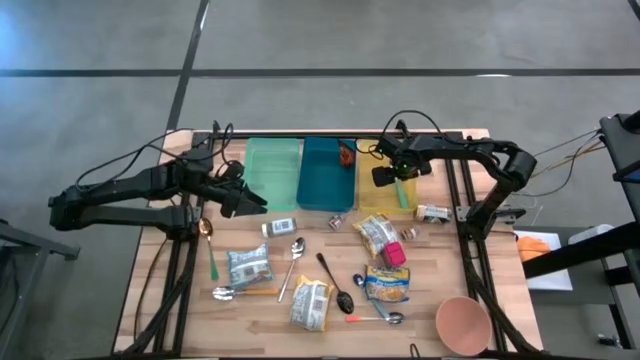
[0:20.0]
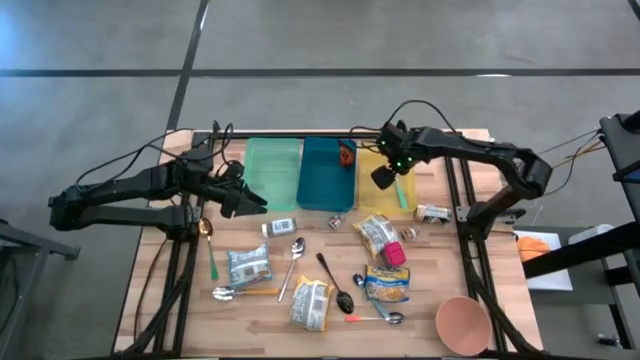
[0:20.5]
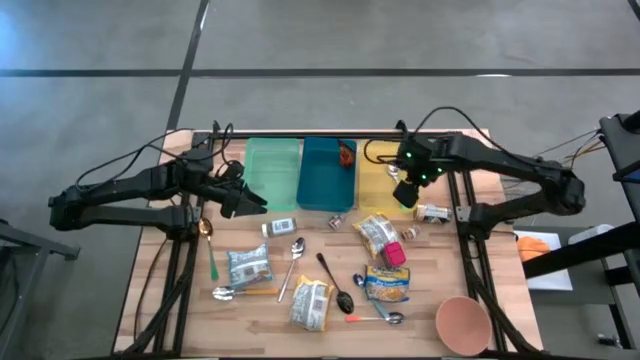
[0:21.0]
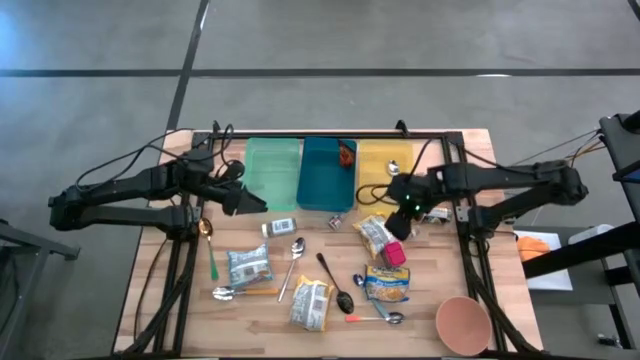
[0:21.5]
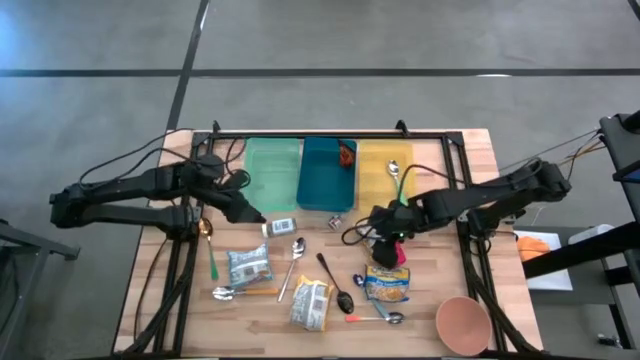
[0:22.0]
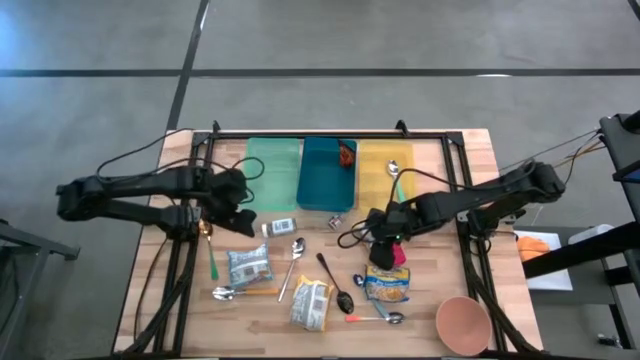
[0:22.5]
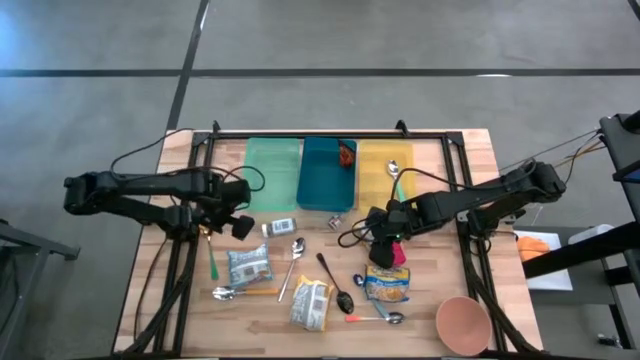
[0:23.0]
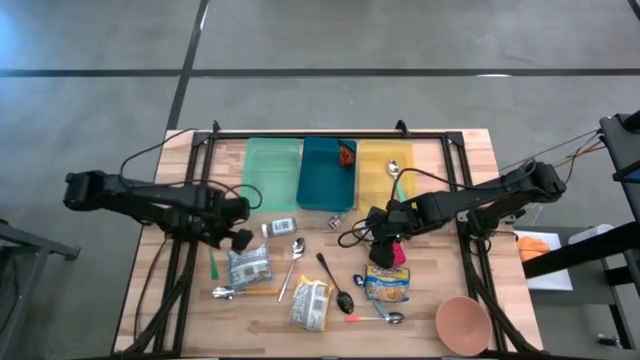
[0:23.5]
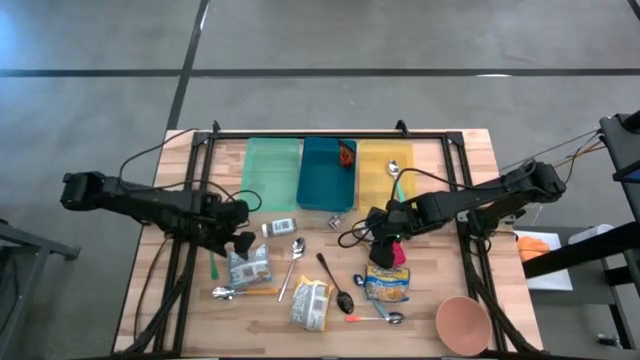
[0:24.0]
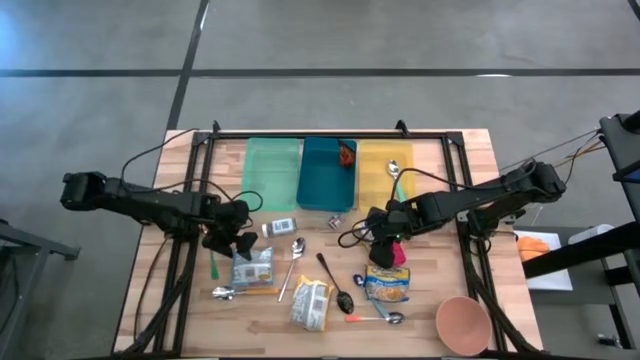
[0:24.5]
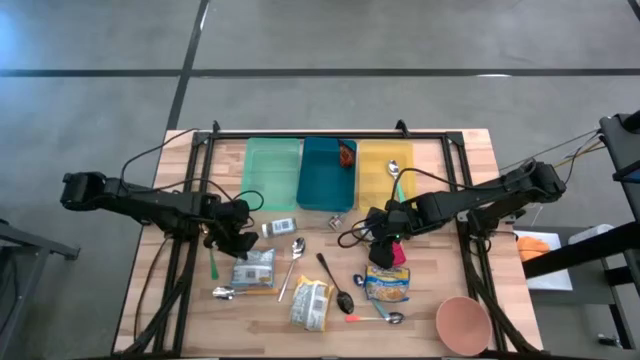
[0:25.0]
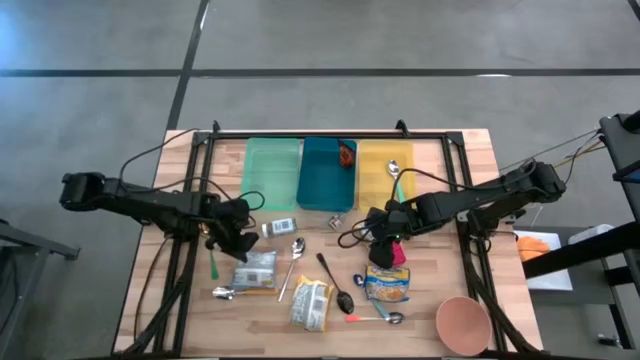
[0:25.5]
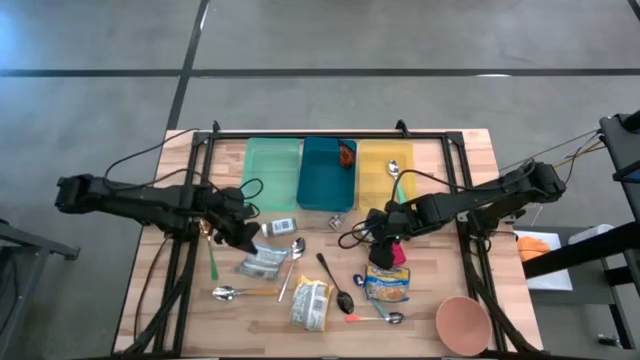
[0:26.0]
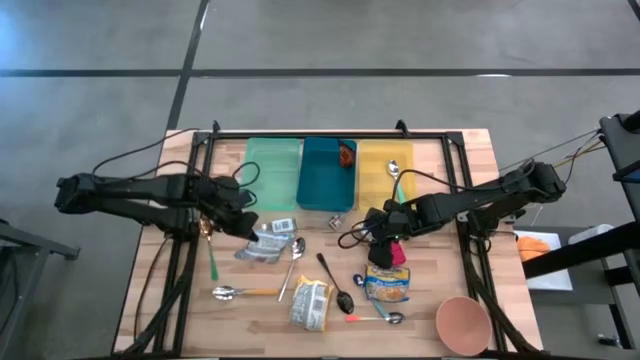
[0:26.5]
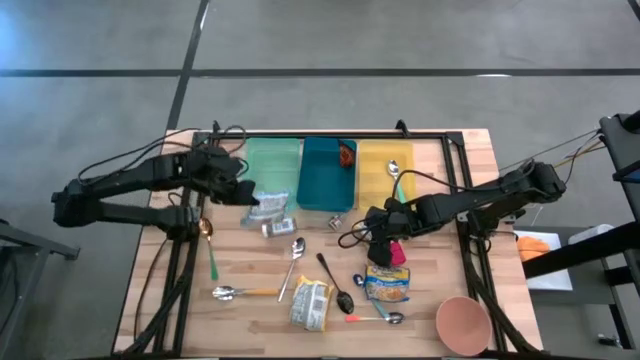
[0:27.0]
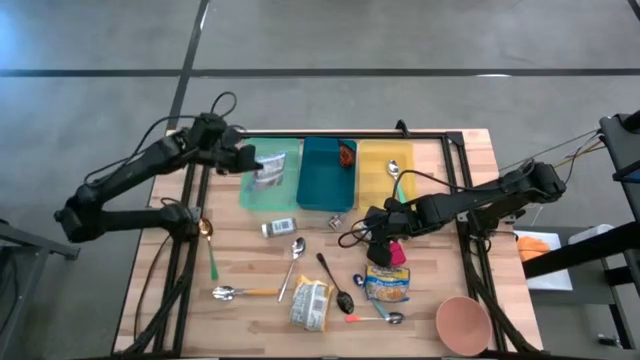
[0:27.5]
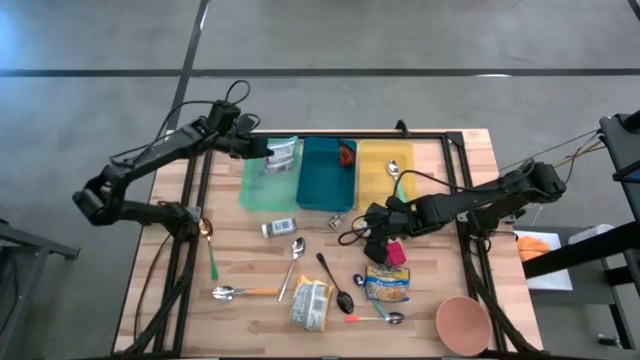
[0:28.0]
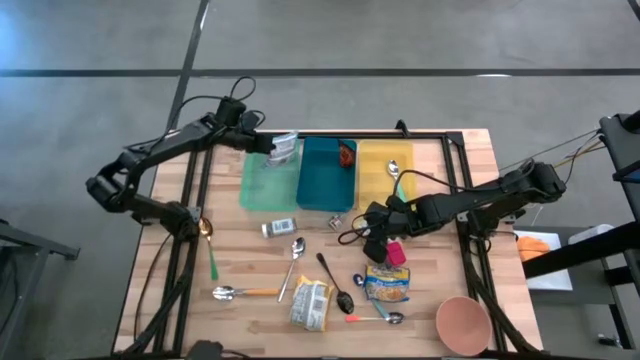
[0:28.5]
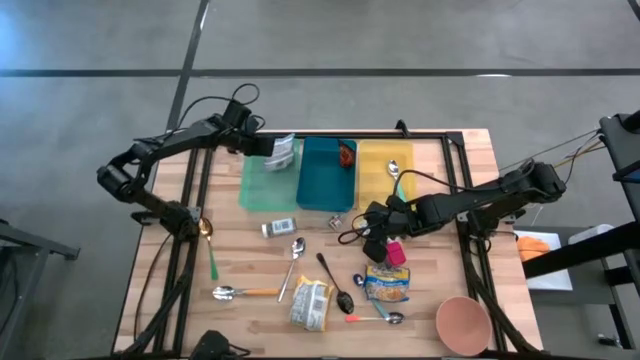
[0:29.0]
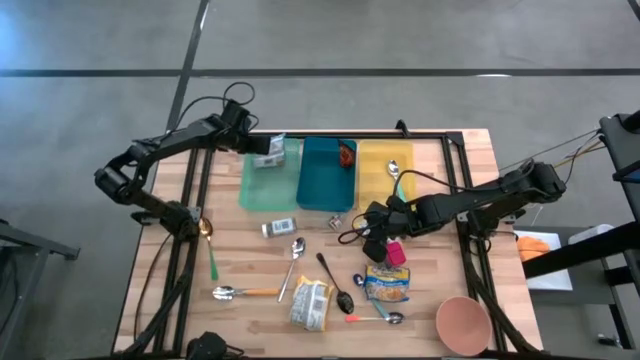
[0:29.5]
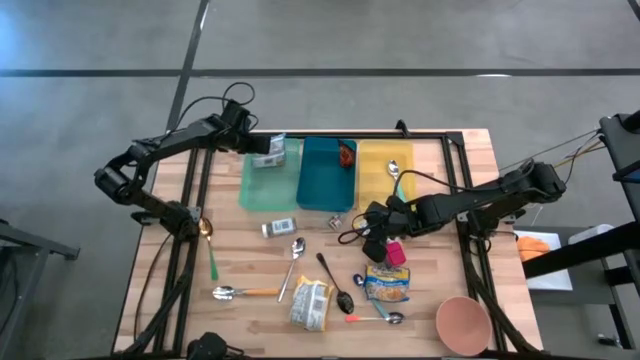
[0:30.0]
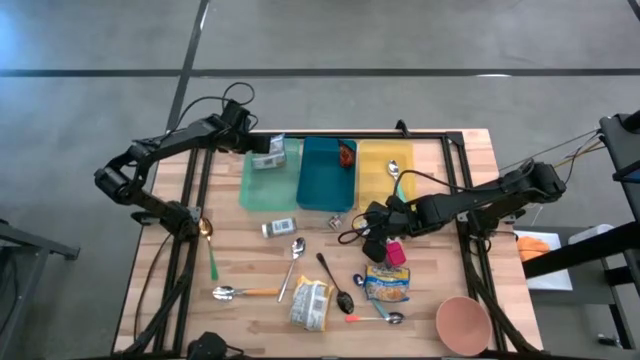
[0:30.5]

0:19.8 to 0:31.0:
Put the light blue noodle pack into the green bin

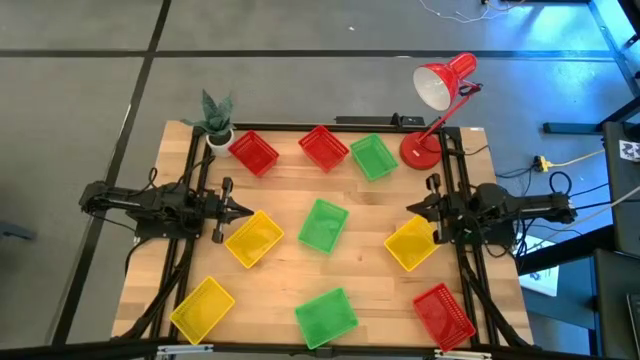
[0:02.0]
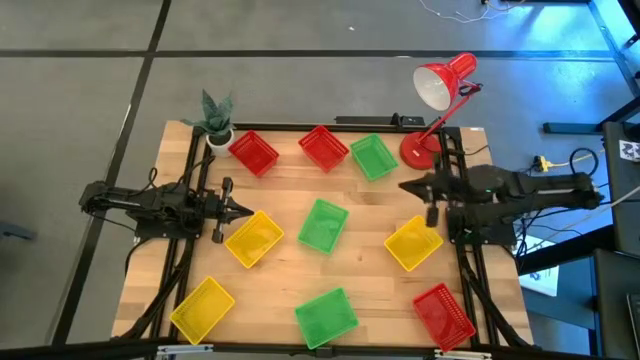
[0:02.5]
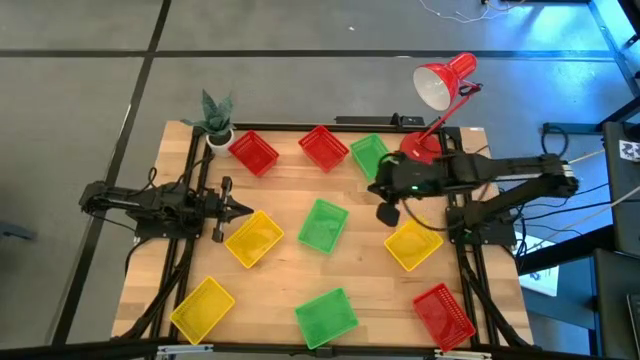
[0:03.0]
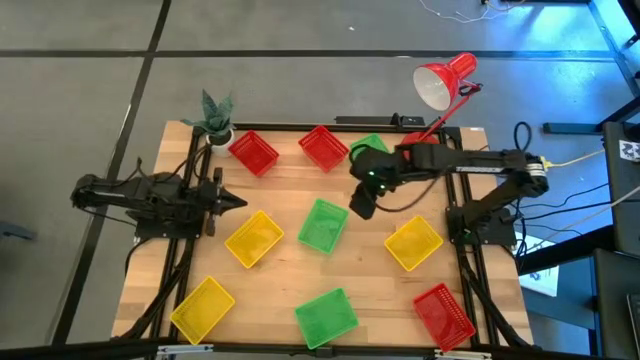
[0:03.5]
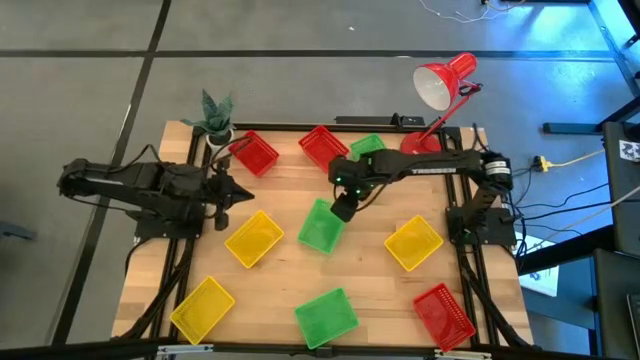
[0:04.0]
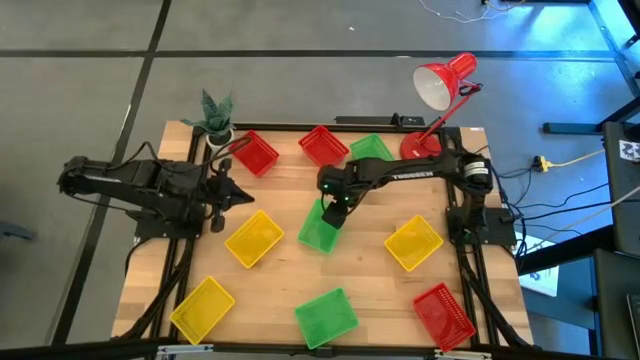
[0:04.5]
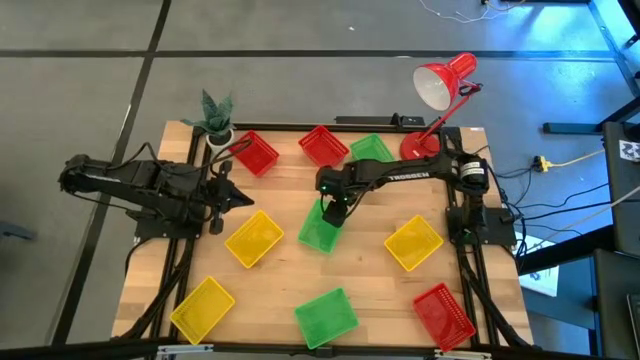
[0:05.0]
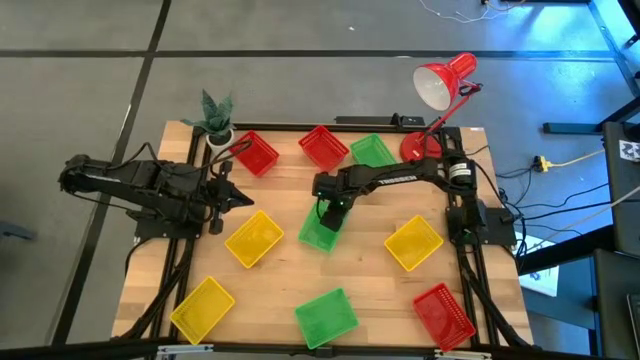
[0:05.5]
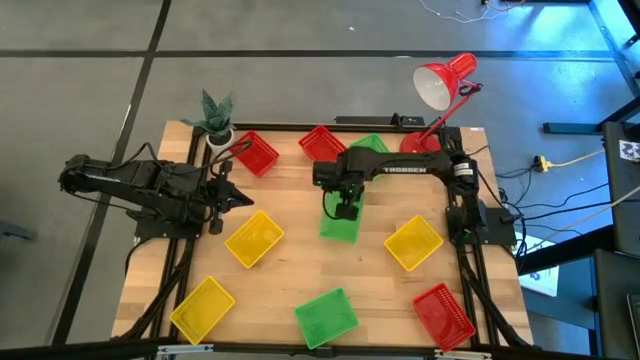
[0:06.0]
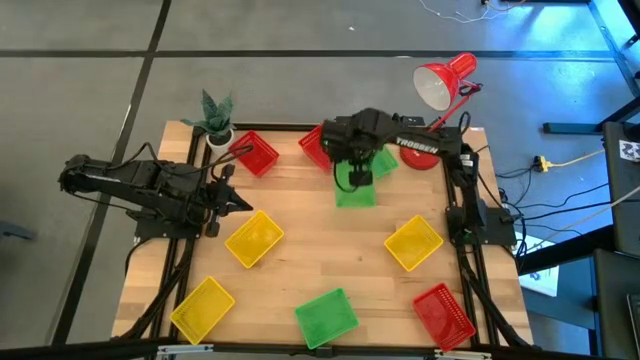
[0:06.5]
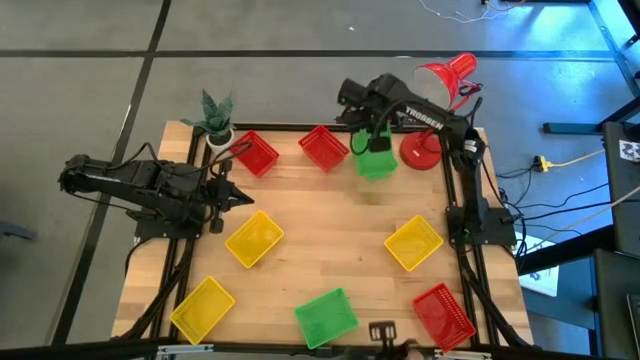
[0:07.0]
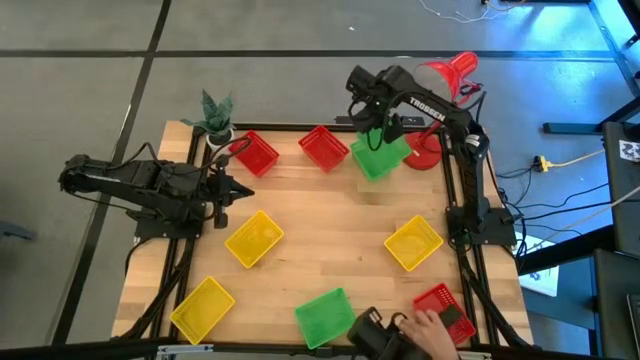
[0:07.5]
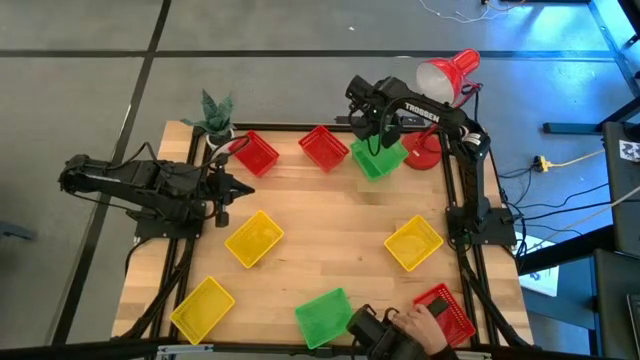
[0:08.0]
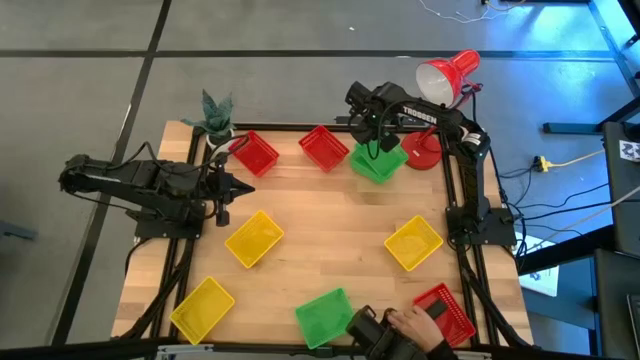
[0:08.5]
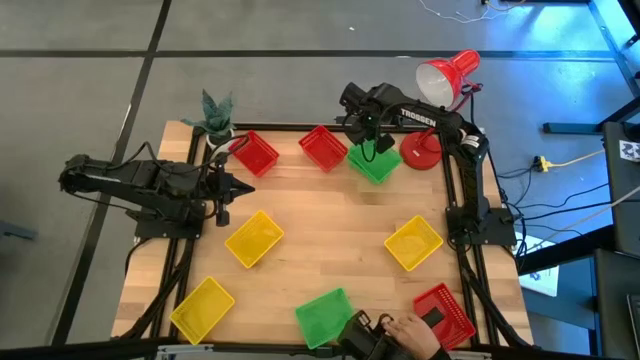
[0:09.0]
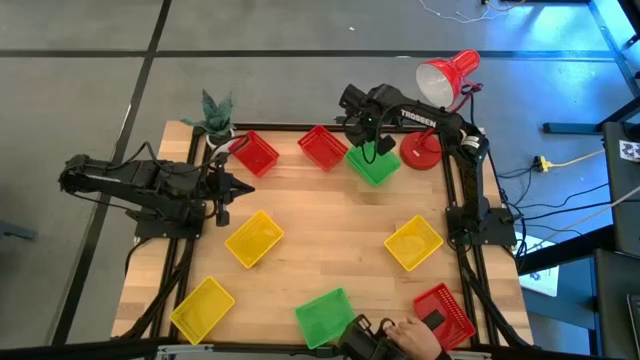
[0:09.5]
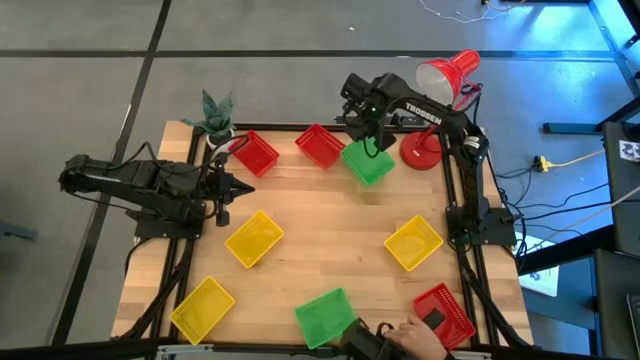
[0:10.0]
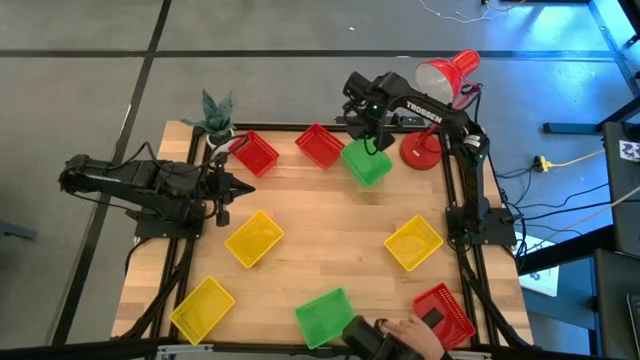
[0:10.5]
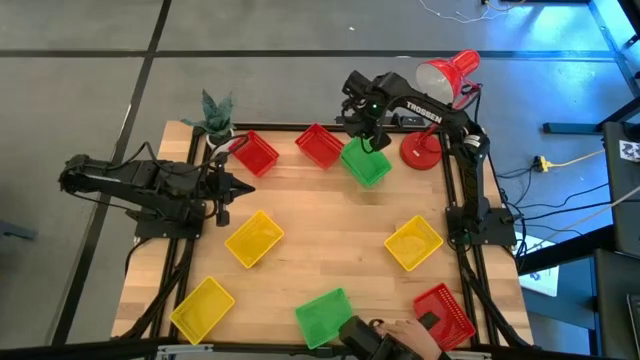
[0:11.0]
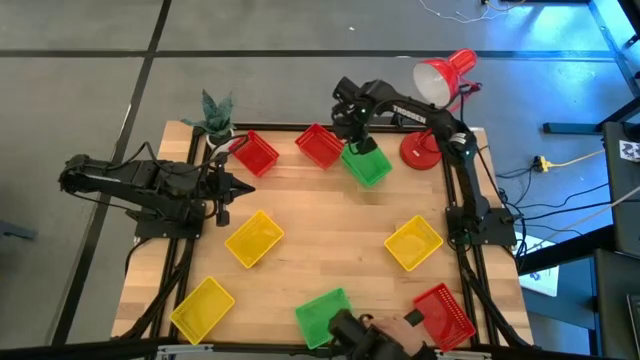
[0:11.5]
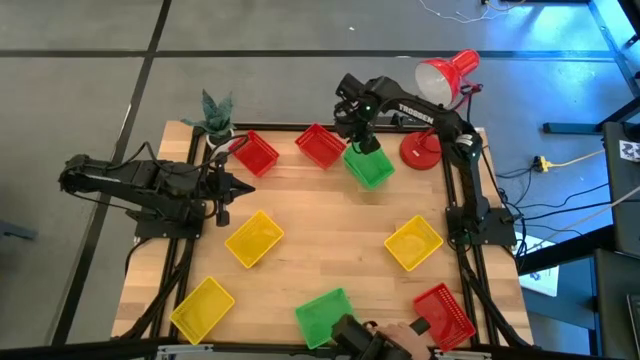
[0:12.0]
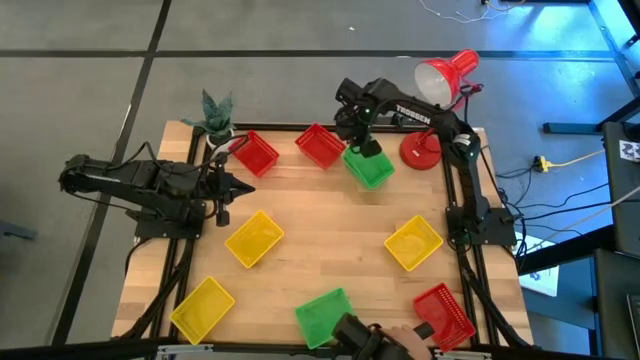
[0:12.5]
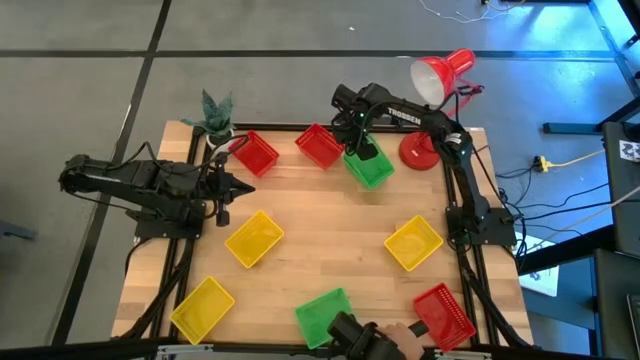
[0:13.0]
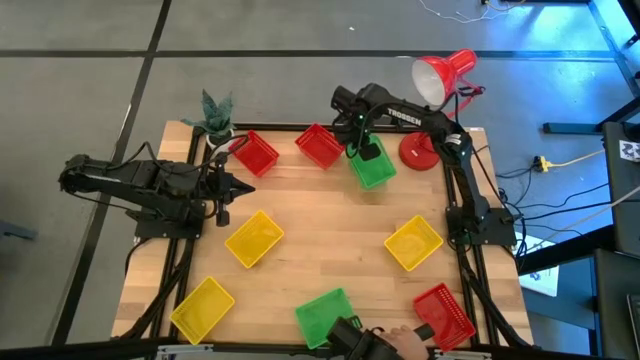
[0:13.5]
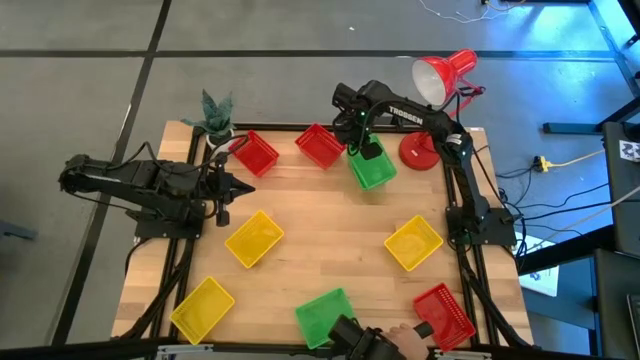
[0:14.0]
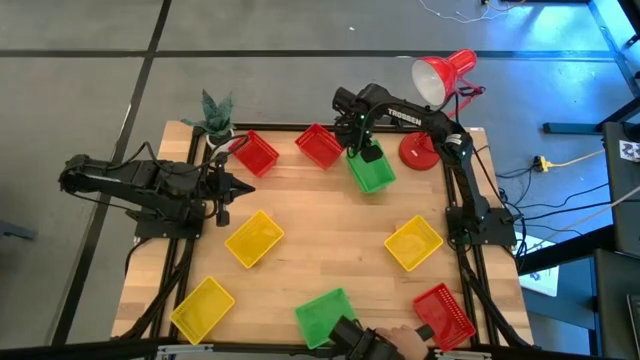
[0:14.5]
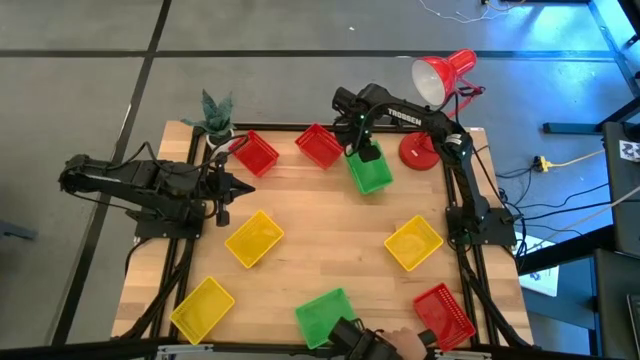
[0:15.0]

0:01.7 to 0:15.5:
Stack the middle green bin on the top green bin
